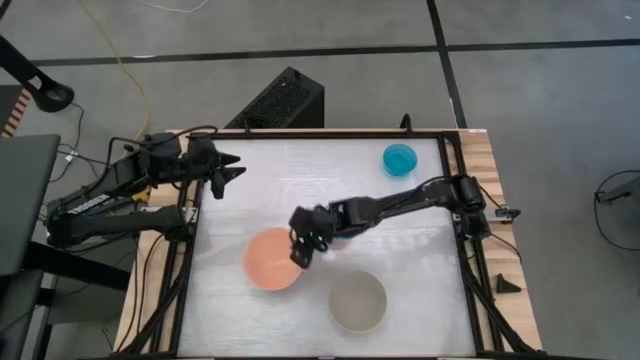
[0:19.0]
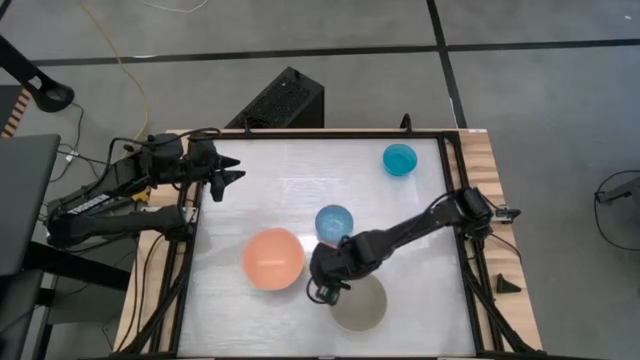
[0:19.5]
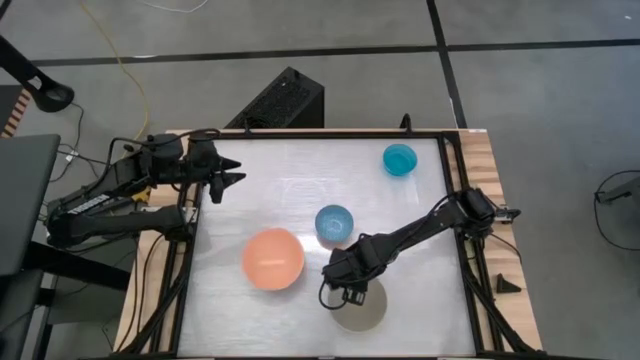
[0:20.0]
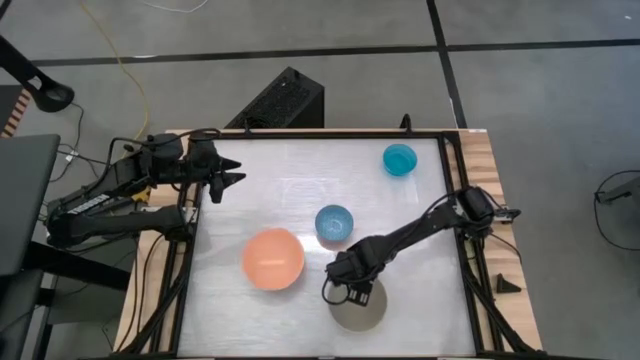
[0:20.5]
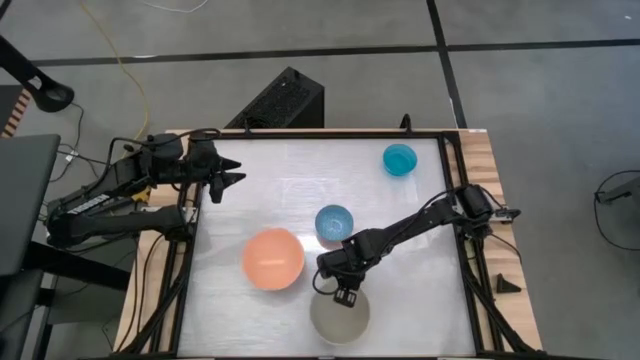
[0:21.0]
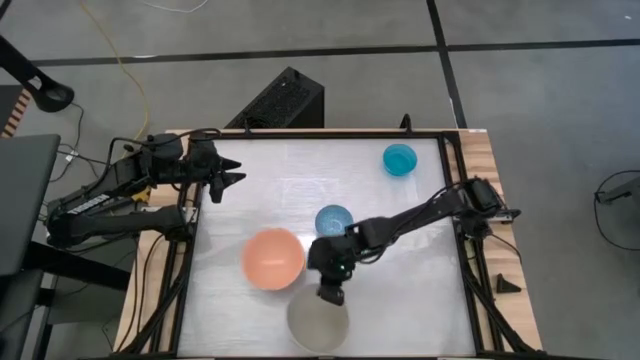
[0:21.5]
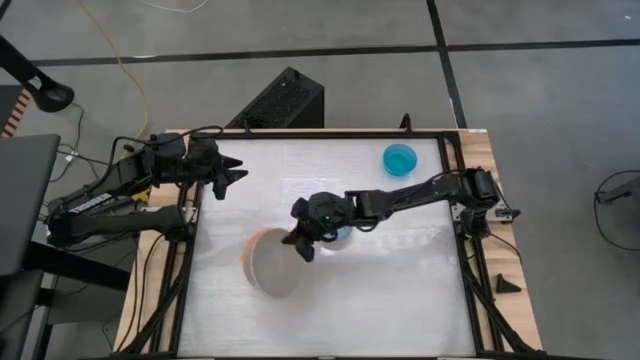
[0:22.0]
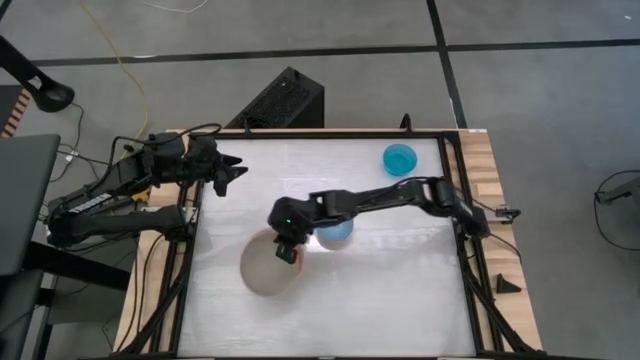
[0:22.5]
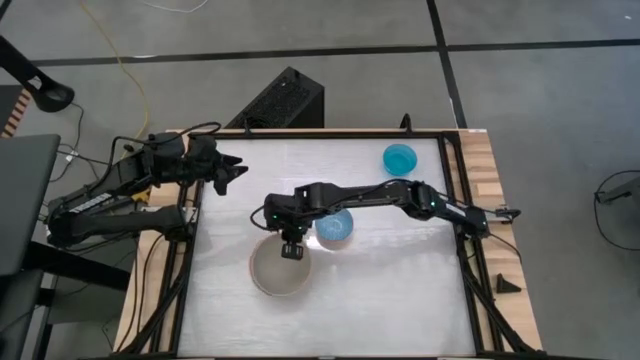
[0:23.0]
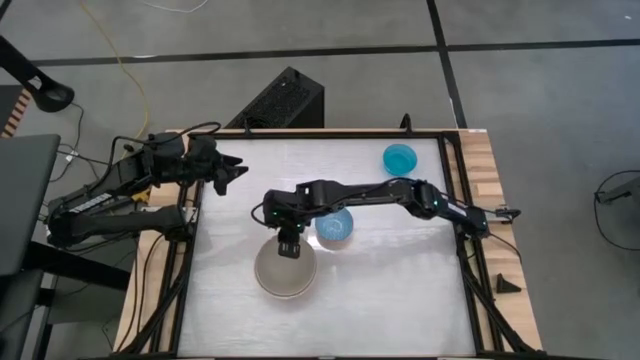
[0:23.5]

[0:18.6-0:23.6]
Stack the gray bowl on top of the orange bowl

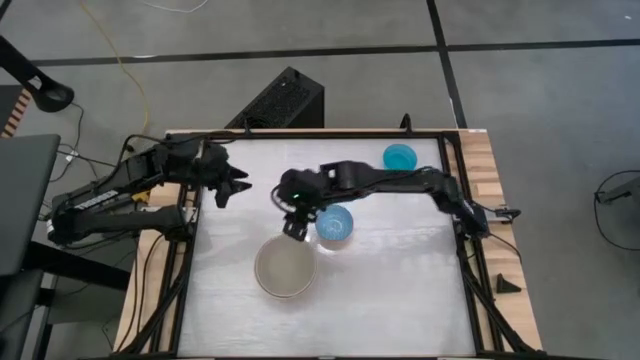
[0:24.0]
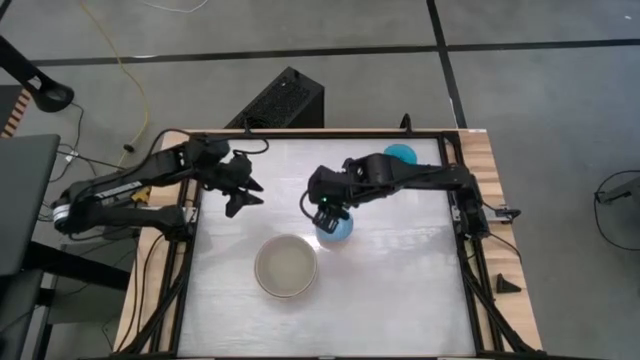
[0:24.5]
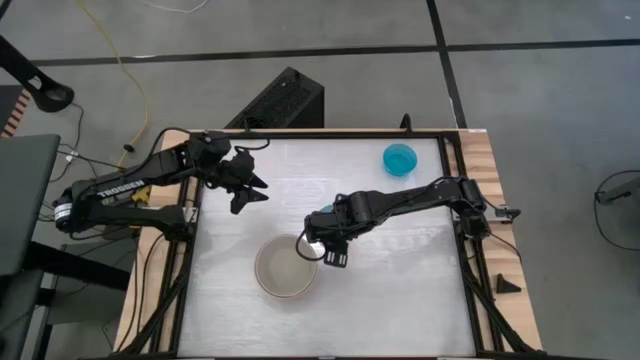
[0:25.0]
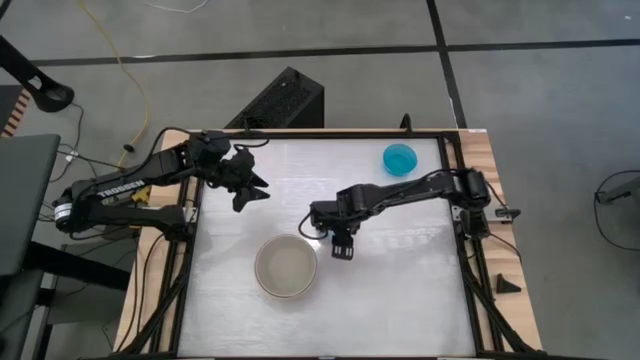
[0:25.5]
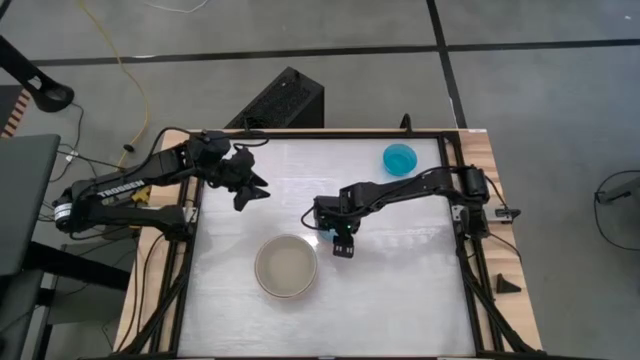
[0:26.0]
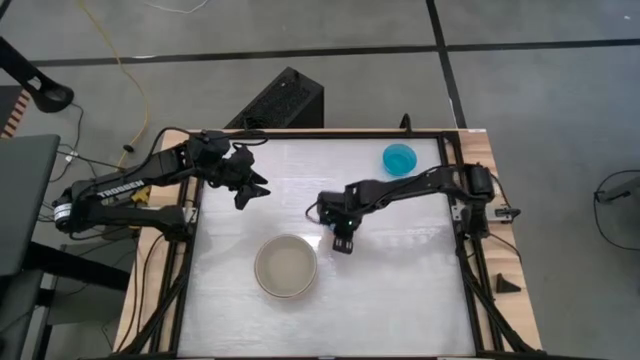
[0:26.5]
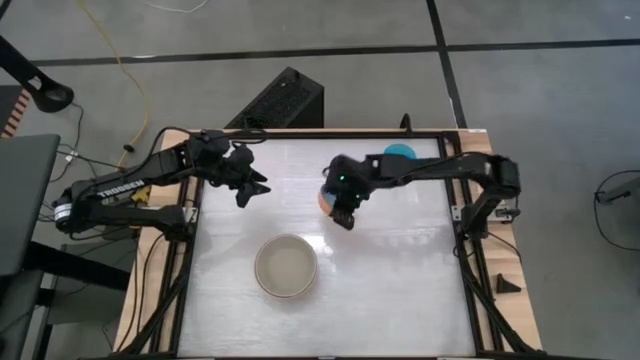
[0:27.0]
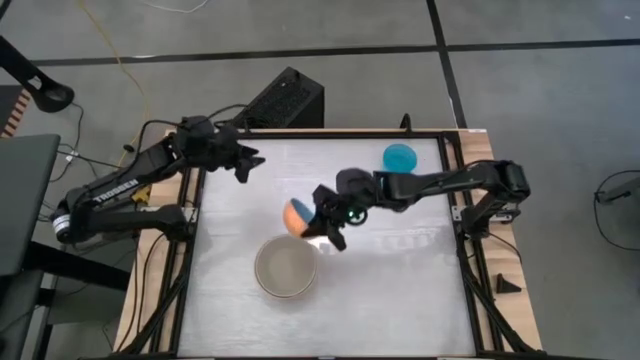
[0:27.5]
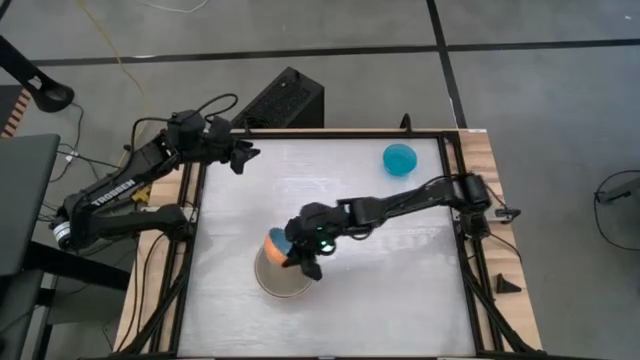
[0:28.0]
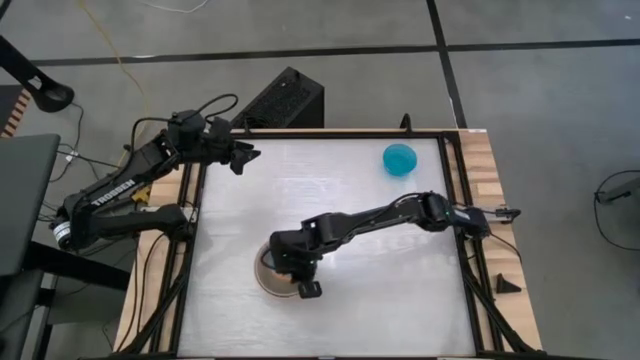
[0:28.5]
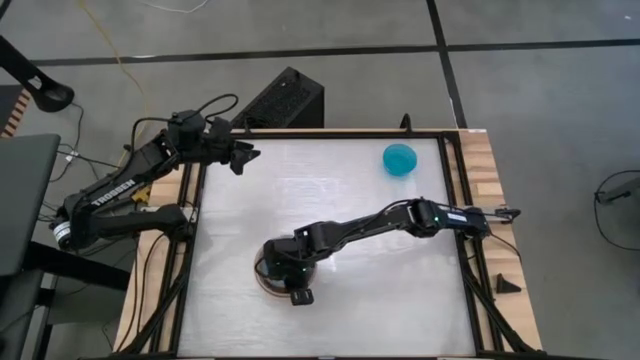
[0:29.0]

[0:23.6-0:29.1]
Stack the blue patterned bowl on top of the gray bowl

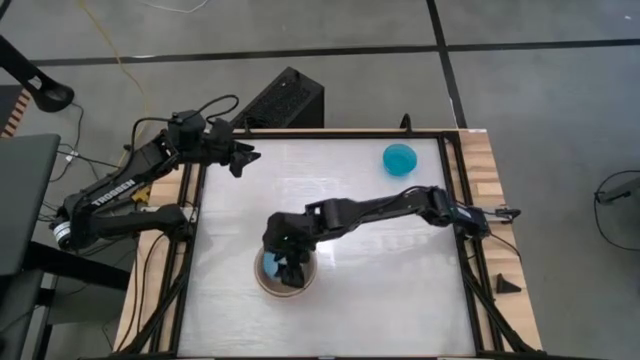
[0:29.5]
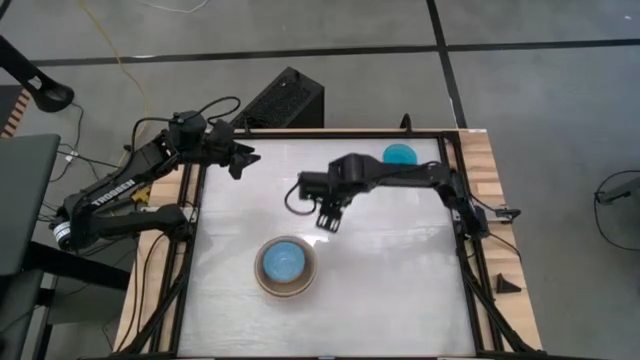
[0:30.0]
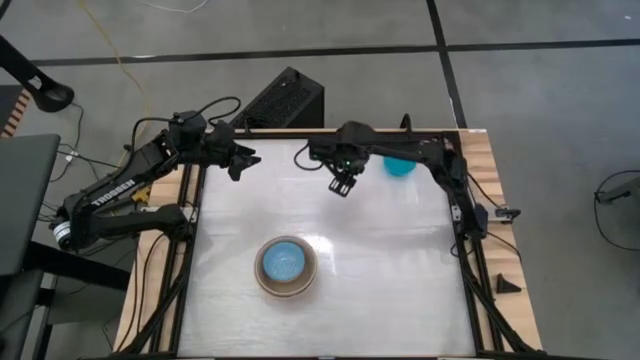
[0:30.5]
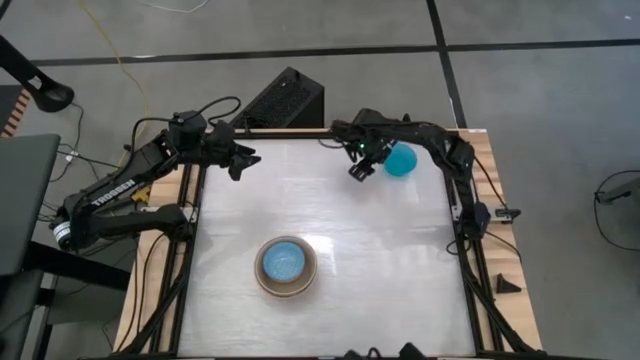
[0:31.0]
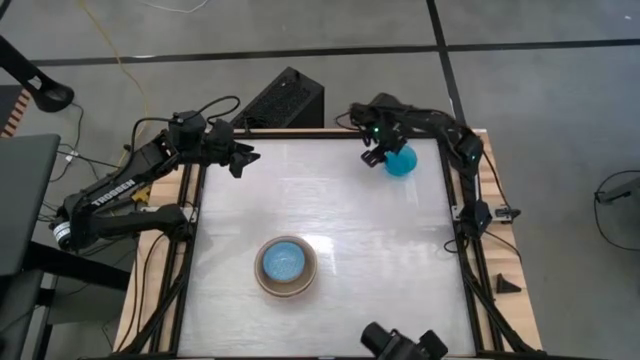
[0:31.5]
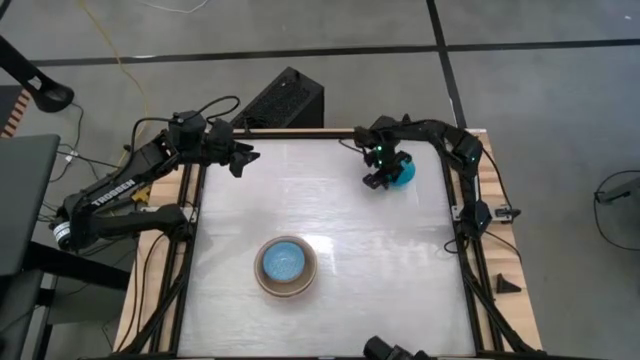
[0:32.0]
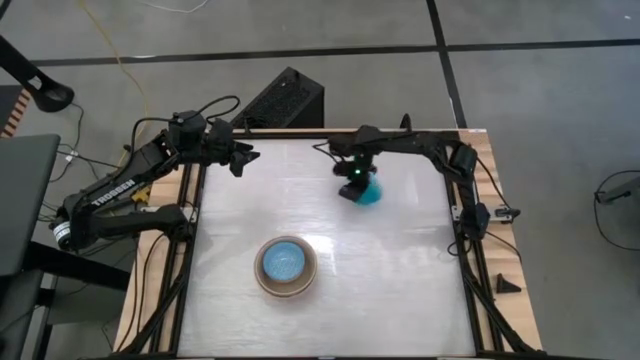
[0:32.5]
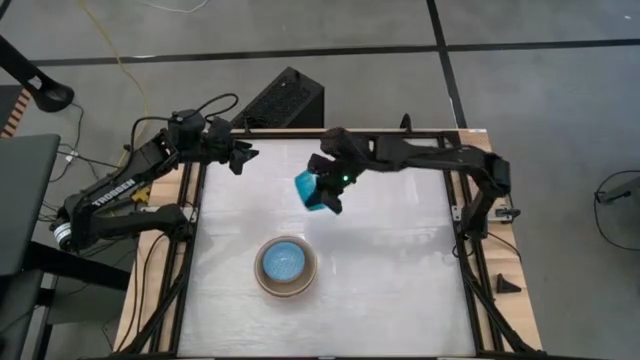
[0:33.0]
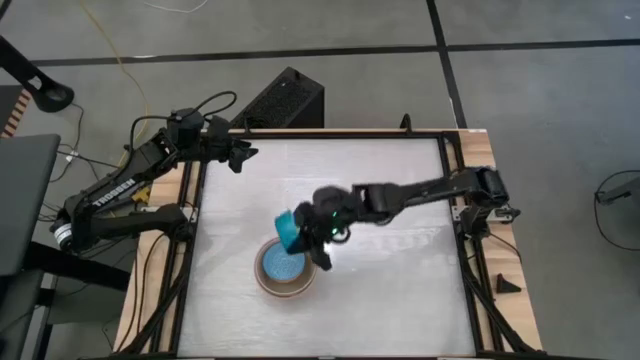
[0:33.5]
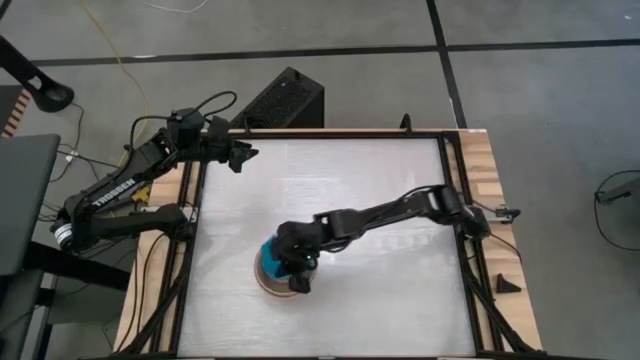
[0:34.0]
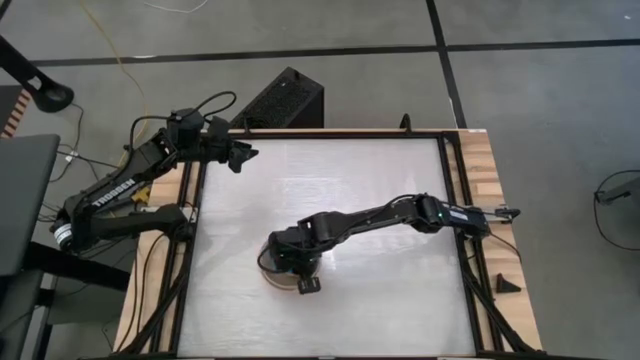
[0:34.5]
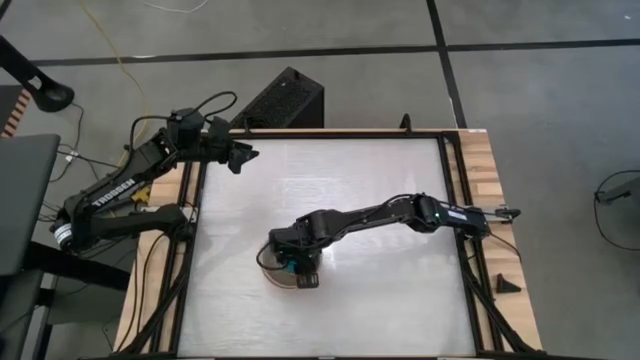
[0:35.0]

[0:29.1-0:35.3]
Stack the blue bowl on top of the blue patterned bowl

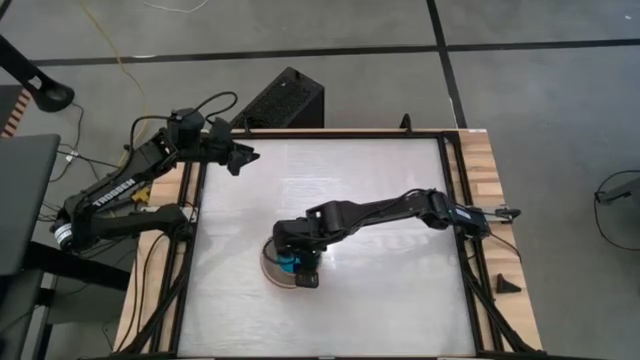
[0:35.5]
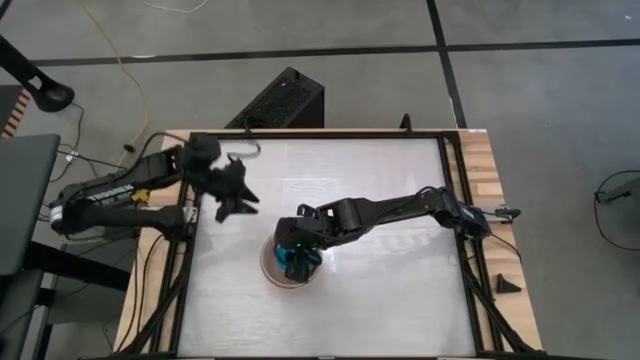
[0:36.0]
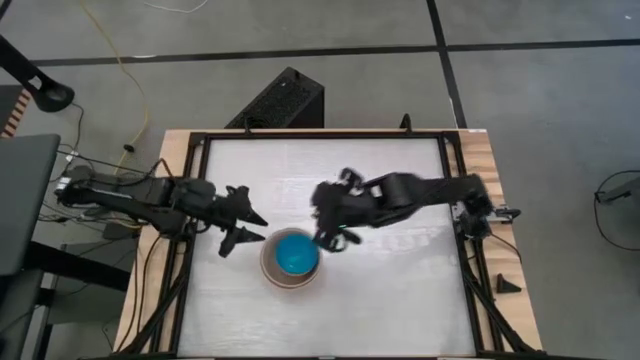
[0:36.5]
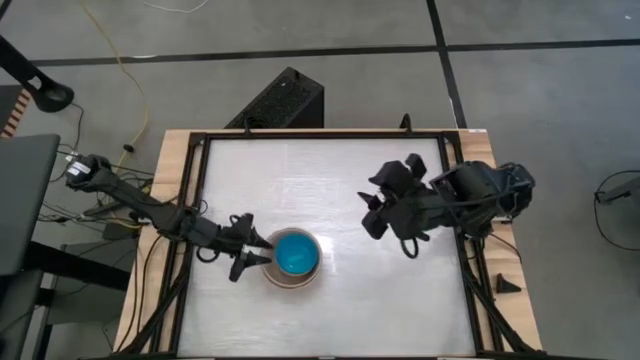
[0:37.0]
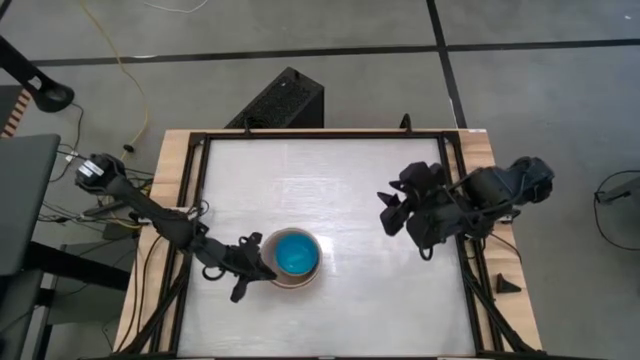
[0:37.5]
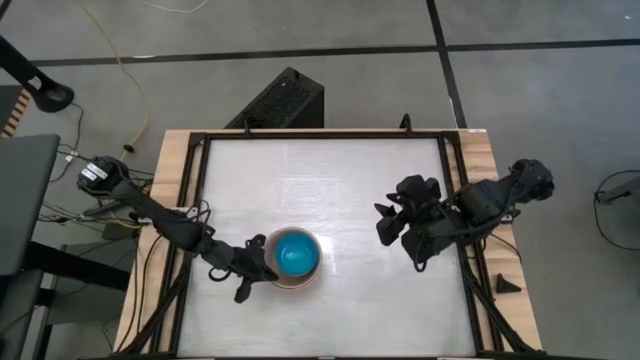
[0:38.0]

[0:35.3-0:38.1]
Adjust the stacked bowls
